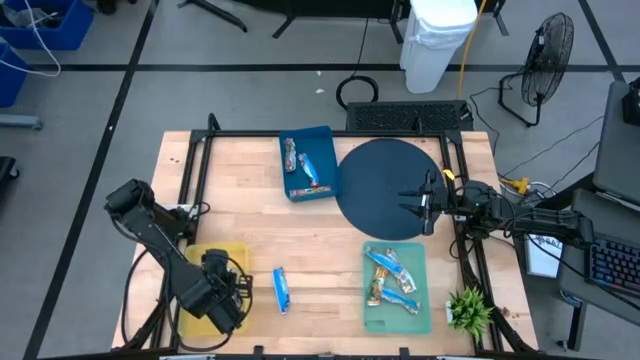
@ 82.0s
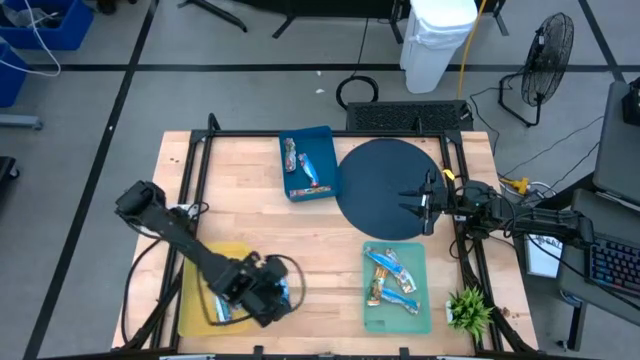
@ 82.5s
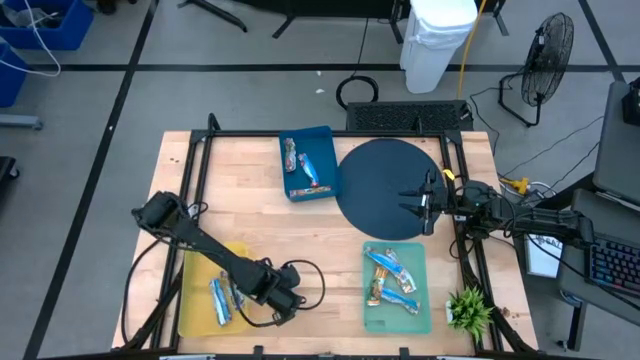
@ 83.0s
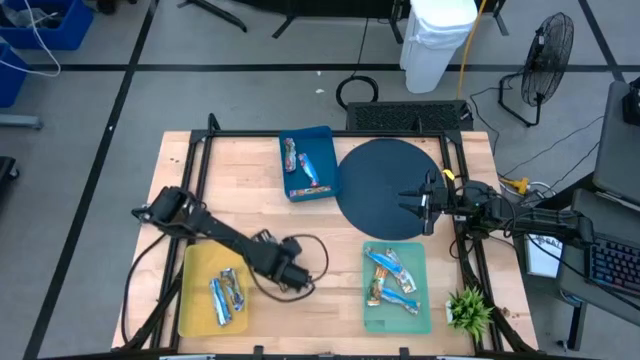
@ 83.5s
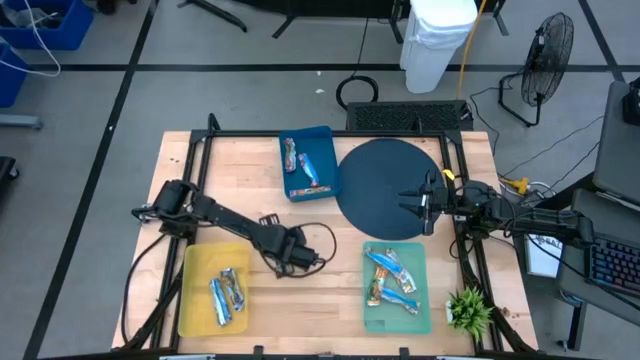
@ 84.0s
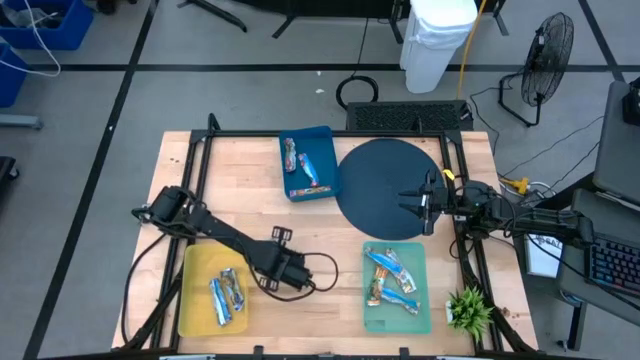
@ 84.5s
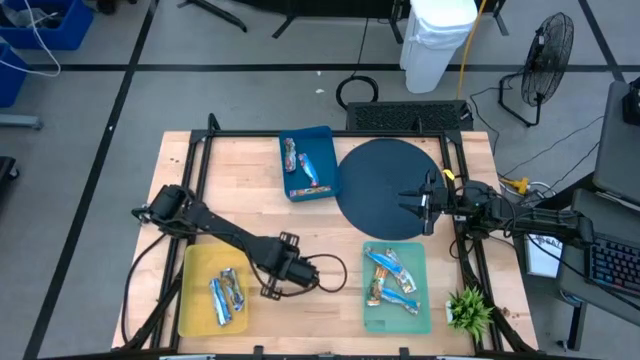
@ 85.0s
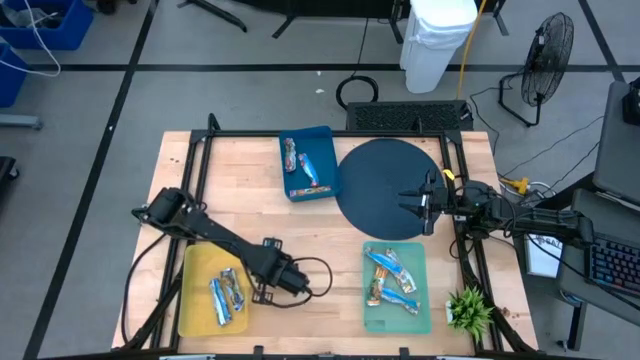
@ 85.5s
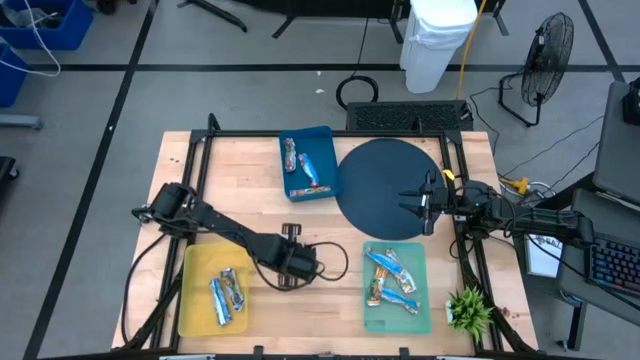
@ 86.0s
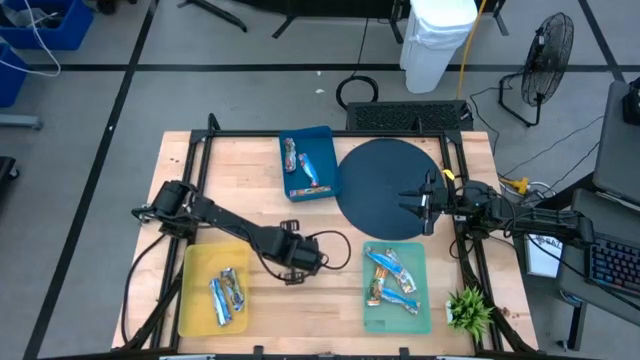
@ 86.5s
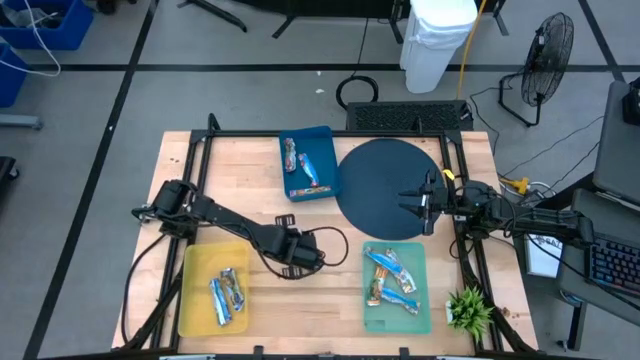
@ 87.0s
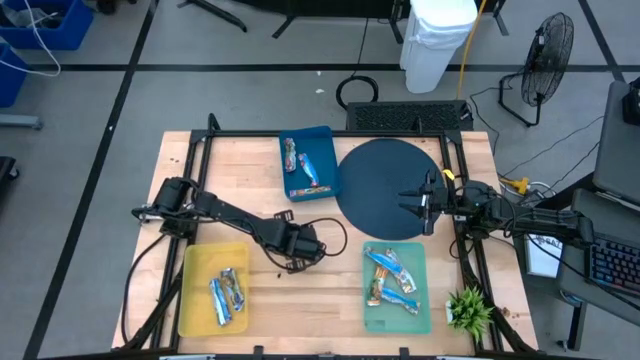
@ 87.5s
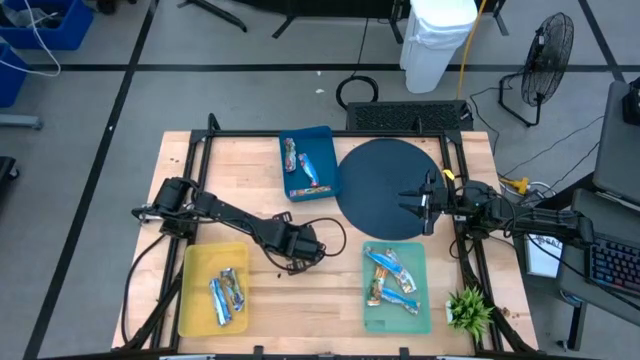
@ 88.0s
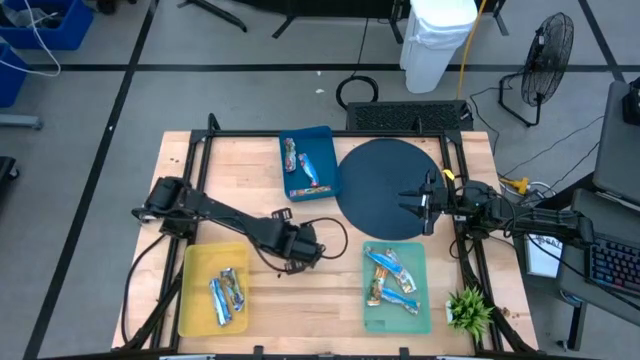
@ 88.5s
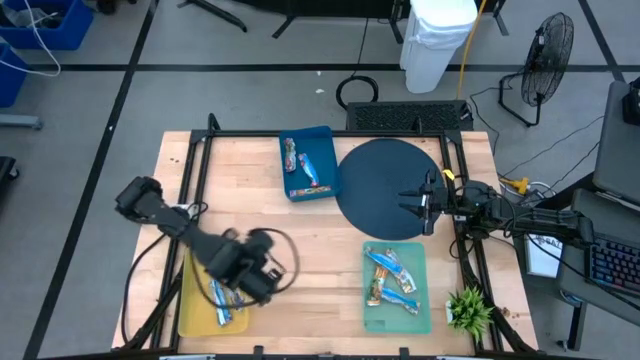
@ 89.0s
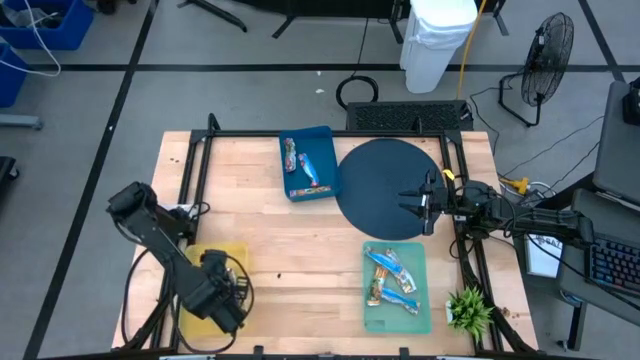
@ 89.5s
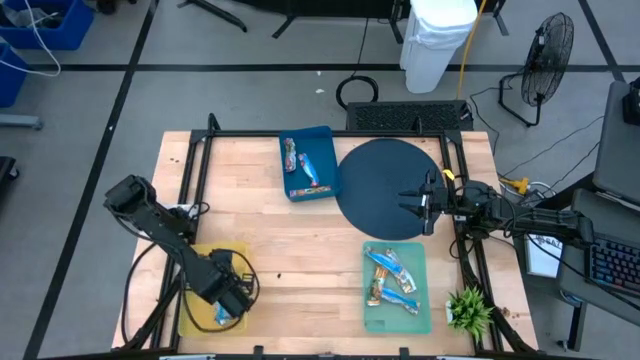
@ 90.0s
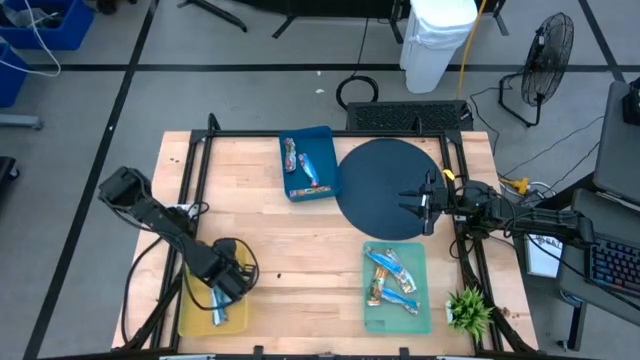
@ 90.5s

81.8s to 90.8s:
Task: Pick and place Granola Bars by type
Put the blue granola bar into the yellow bin

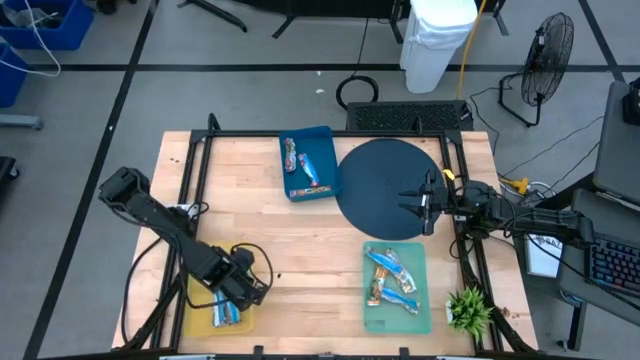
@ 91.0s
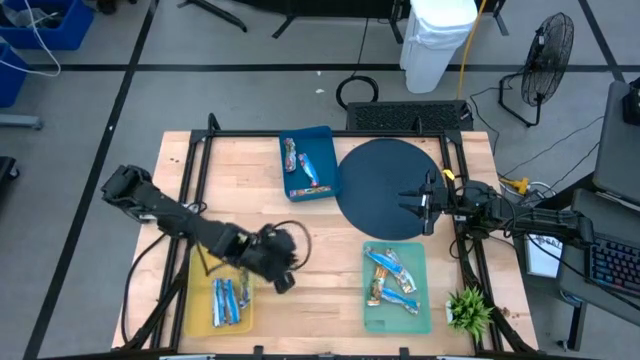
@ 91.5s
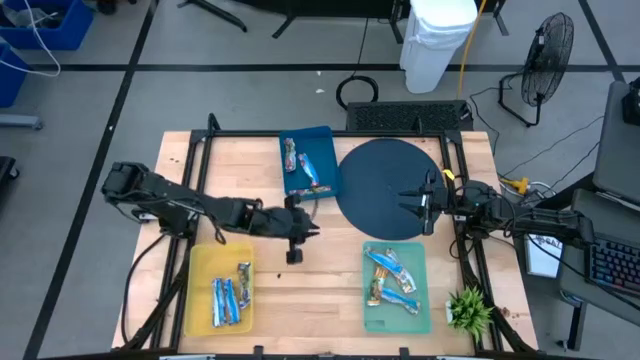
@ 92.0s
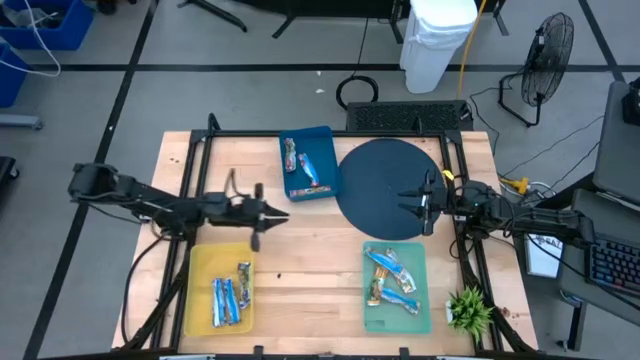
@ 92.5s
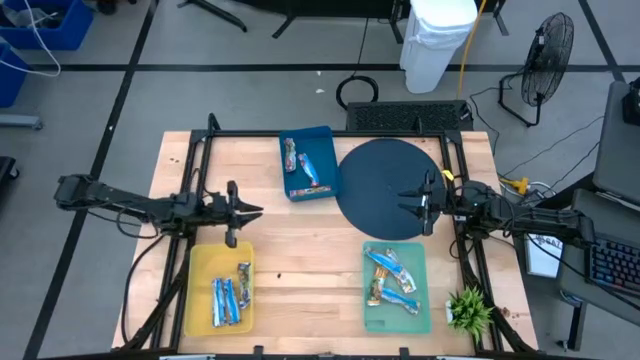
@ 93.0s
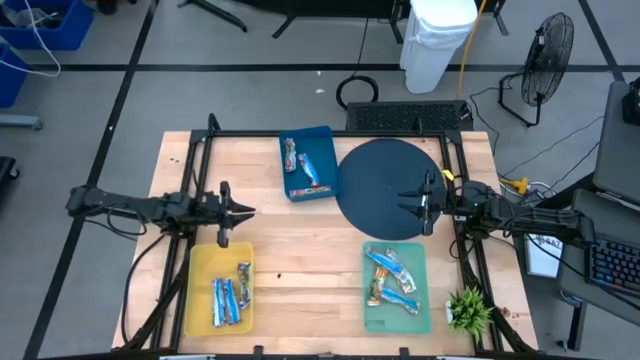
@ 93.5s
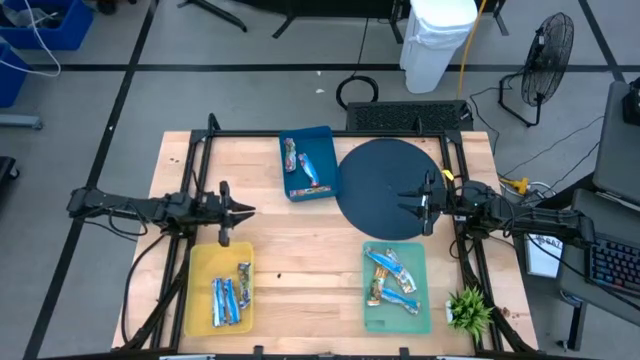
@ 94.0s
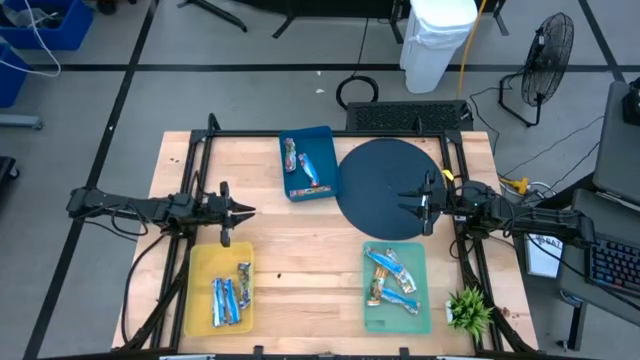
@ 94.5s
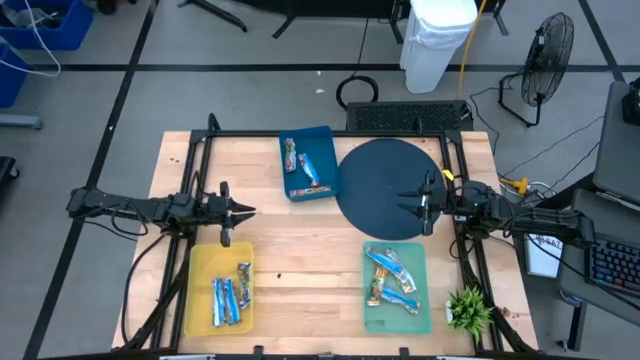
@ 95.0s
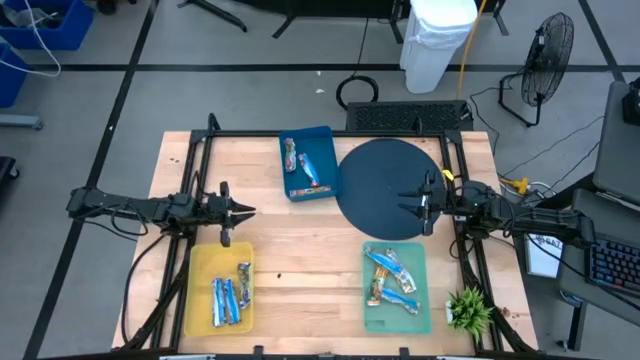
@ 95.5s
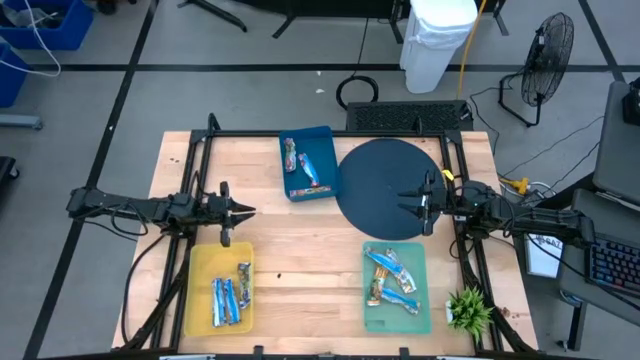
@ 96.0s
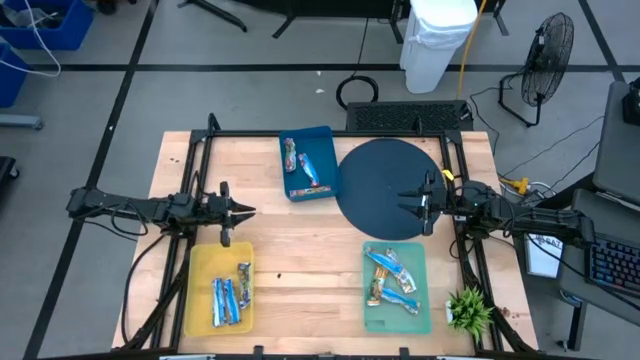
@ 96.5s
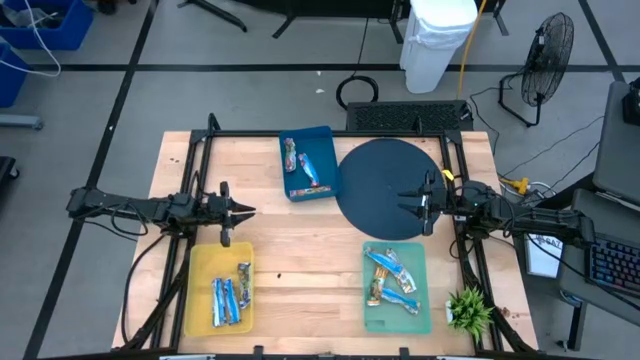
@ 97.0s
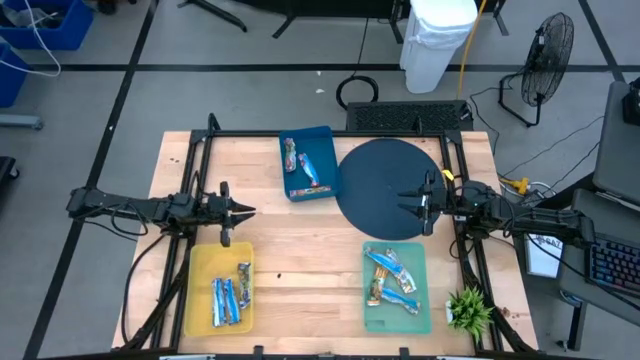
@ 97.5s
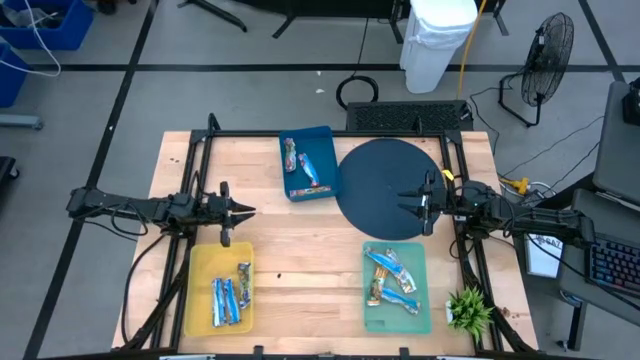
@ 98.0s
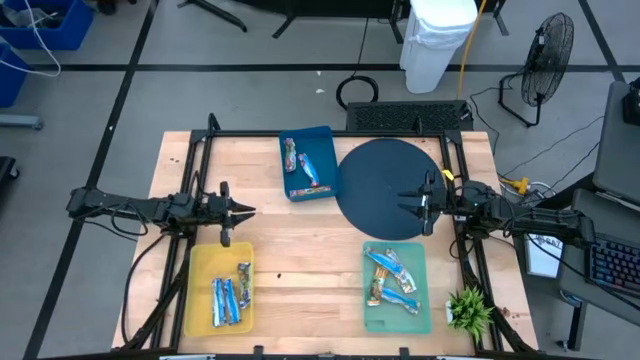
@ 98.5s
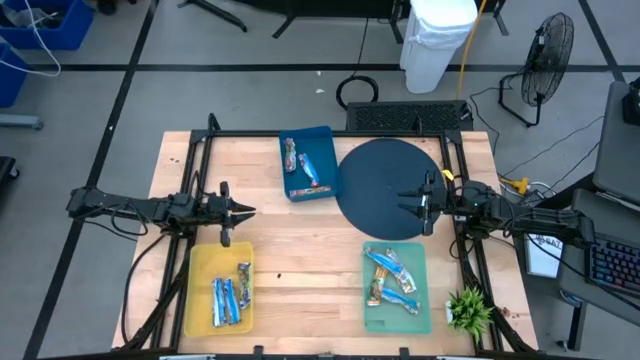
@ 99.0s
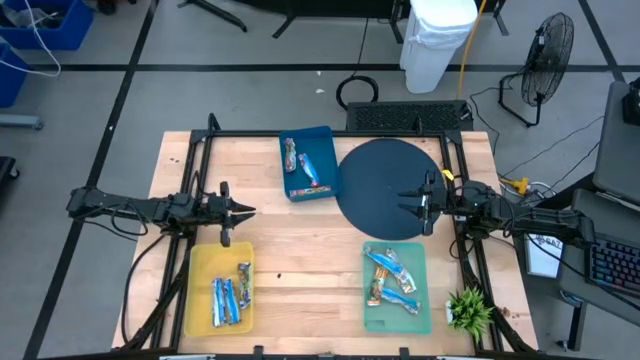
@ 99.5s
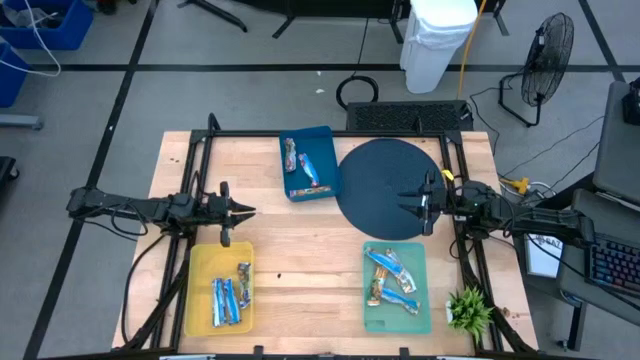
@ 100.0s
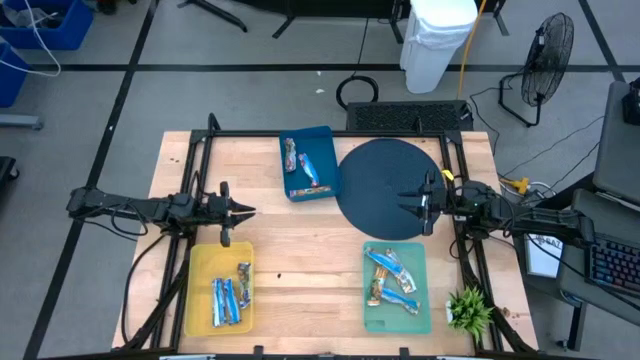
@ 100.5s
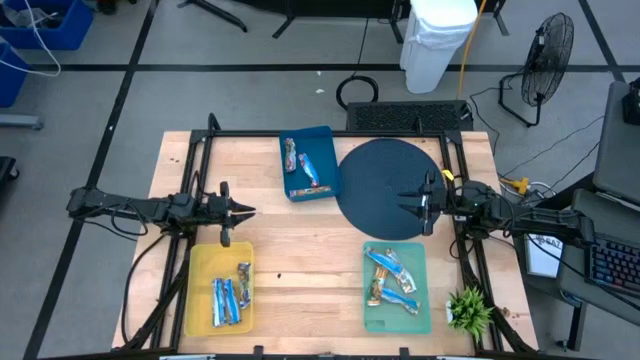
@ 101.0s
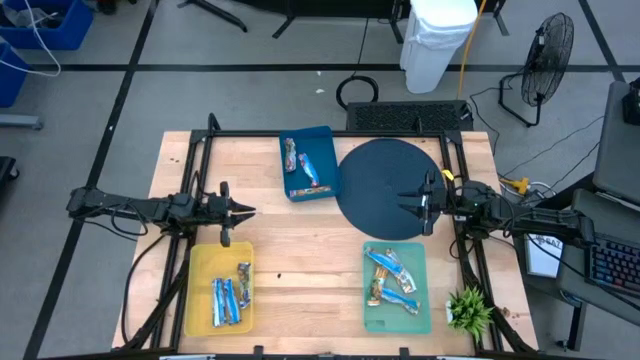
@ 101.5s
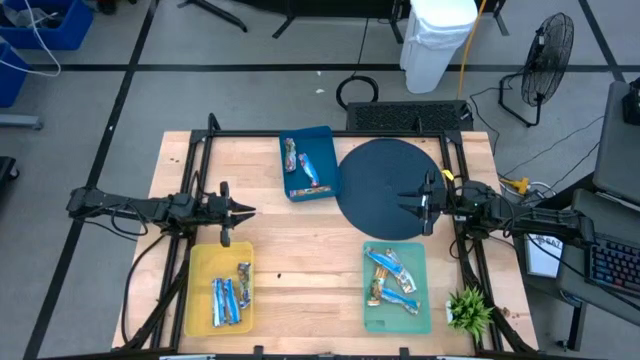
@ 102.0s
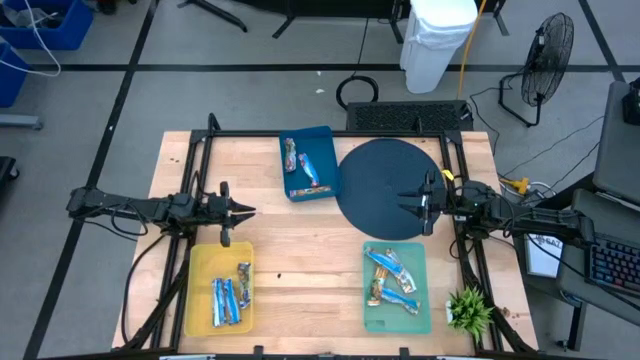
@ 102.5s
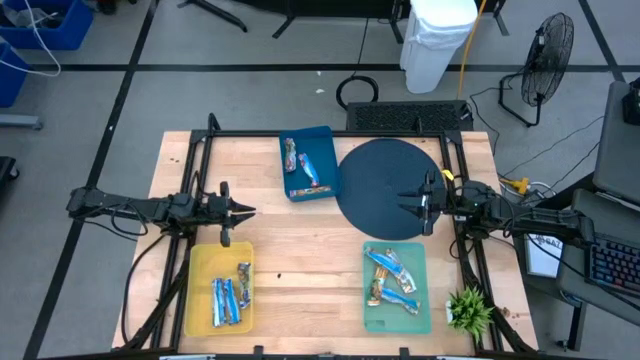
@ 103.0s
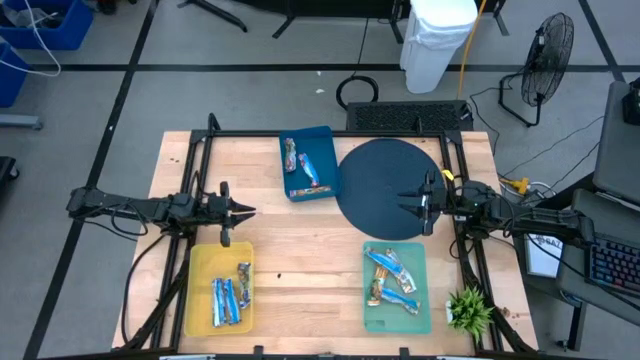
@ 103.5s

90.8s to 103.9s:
Return to Home Position
